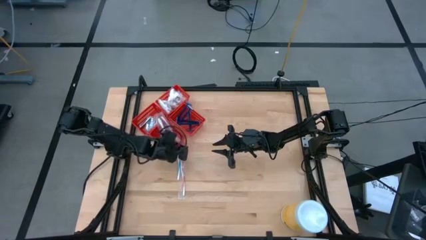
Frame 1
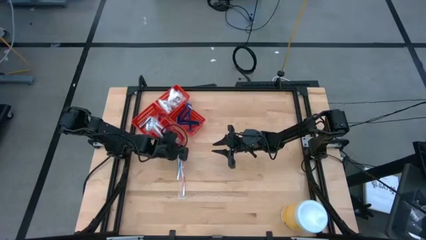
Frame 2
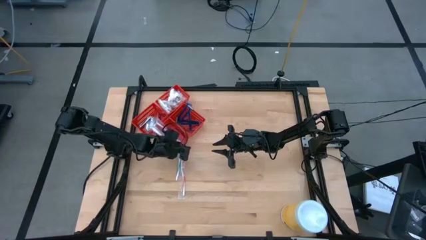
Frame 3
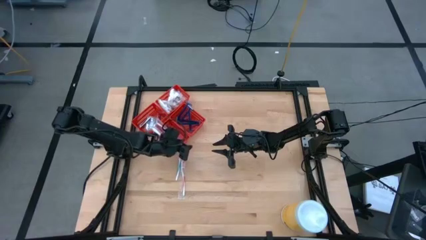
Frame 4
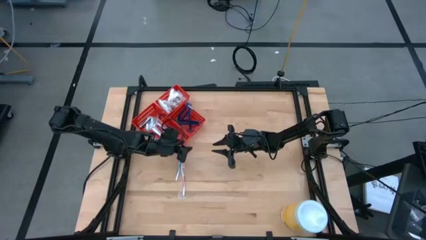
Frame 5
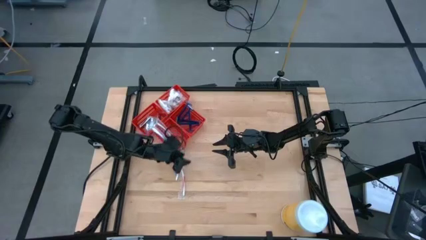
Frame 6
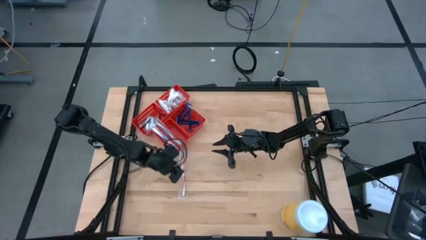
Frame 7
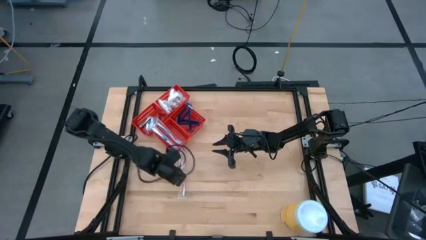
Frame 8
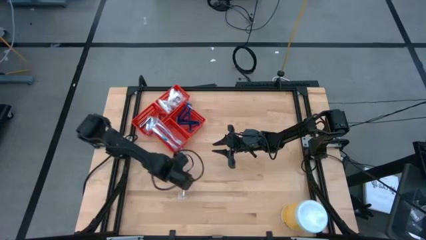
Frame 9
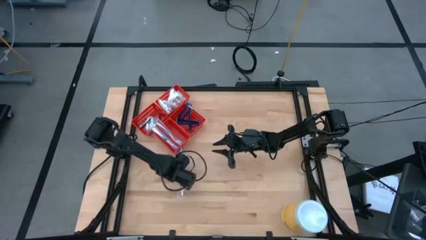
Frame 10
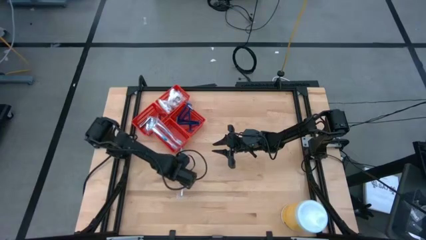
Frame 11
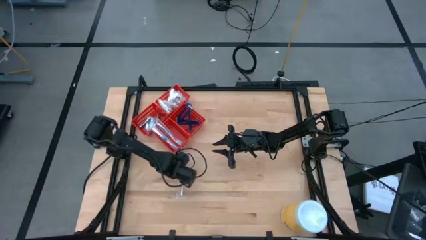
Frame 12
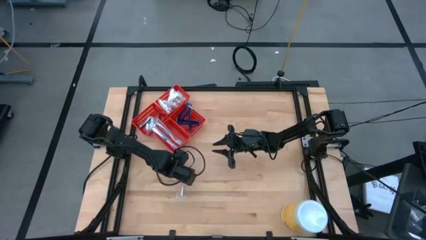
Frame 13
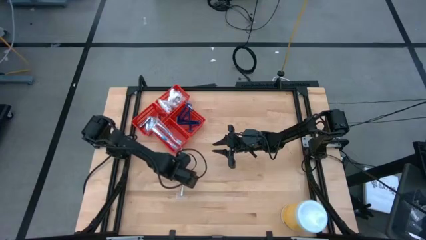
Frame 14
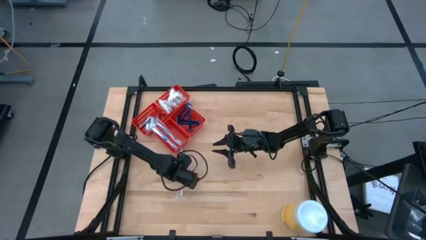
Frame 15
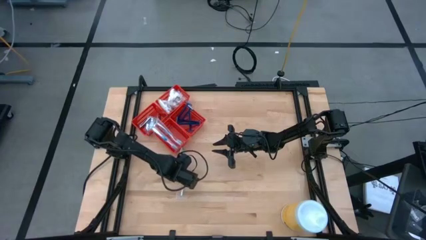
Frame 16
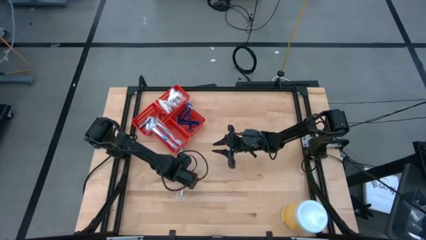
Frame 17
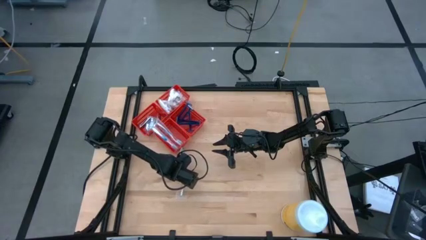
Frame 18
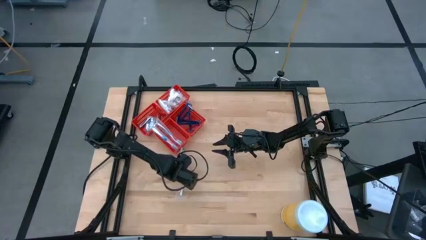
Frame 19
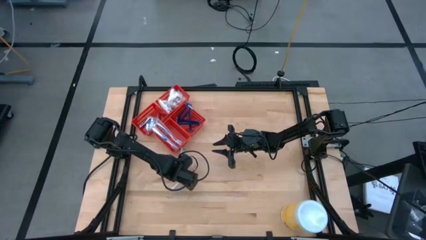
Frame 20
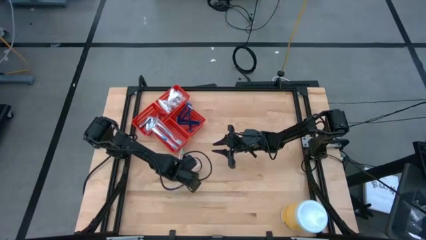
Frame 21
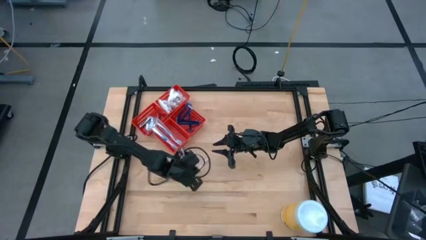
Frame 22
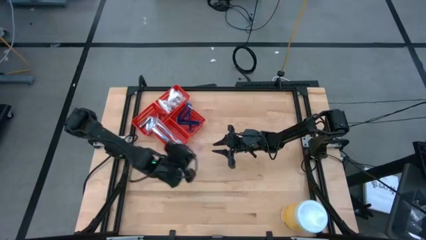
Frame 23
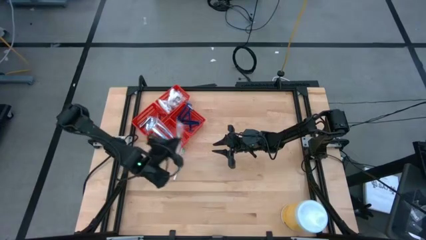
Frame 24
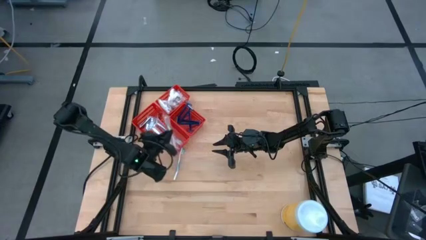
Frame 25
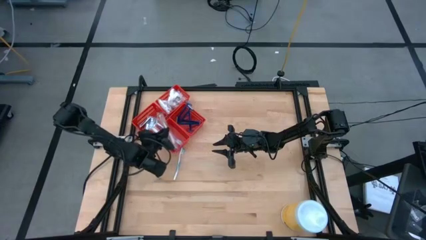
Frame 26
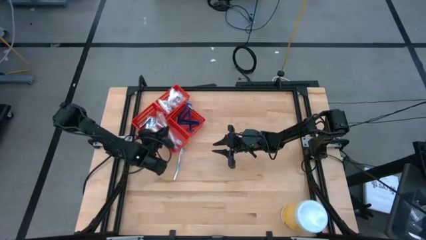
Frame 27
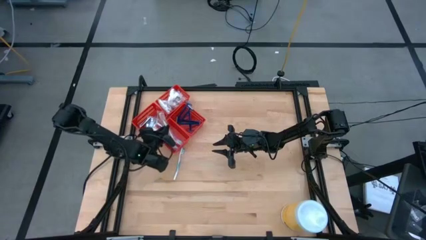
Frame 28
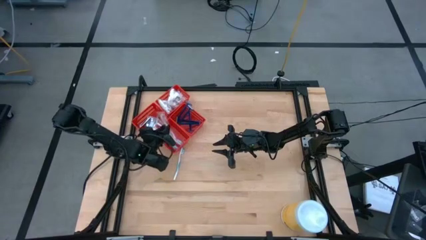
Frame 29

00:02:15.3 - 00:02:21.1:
Task: Pick & Place Travel size toiletries
Put the orange toothbrush into the verical left red bin

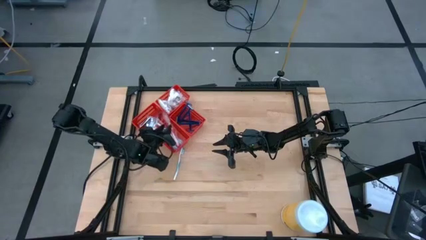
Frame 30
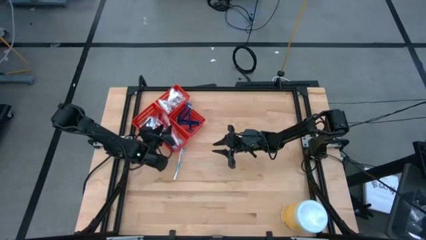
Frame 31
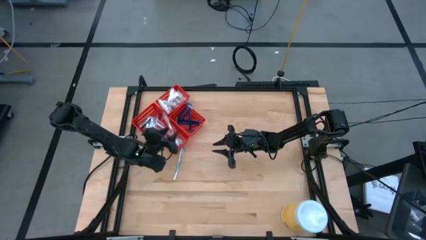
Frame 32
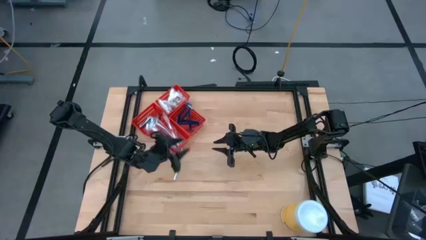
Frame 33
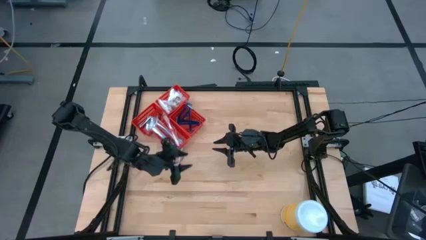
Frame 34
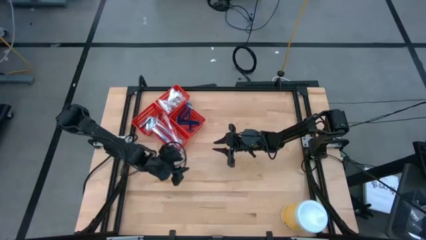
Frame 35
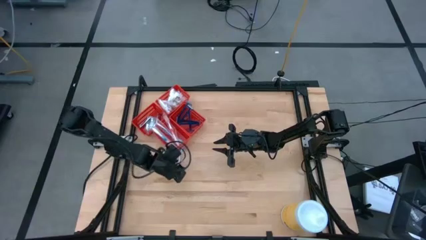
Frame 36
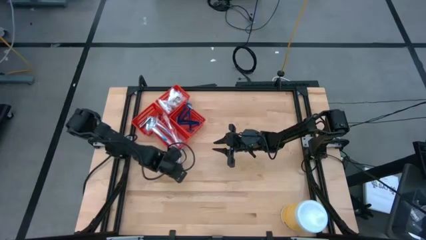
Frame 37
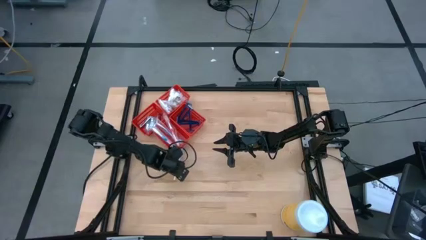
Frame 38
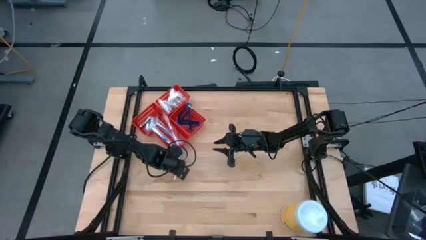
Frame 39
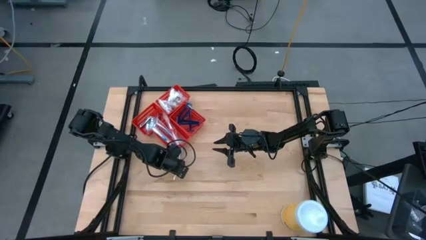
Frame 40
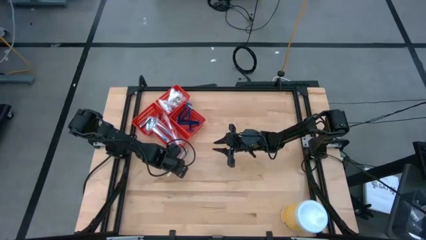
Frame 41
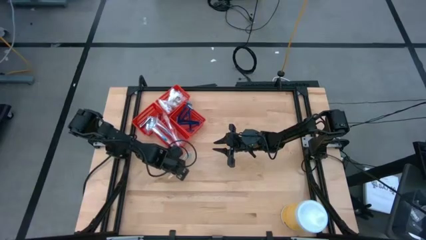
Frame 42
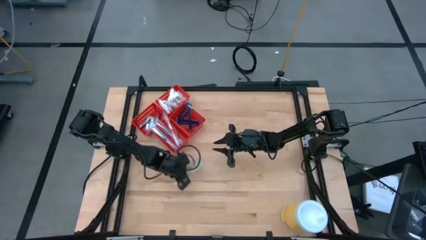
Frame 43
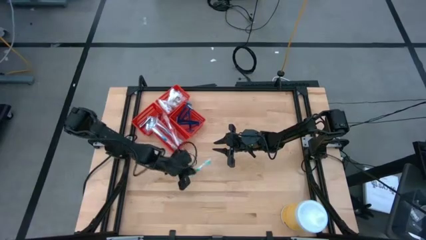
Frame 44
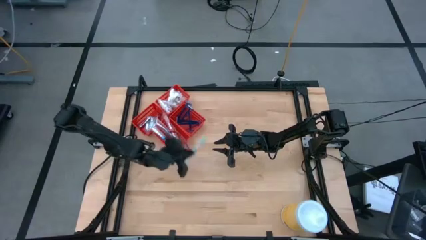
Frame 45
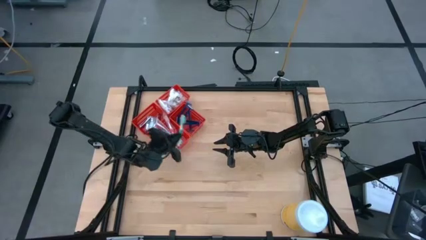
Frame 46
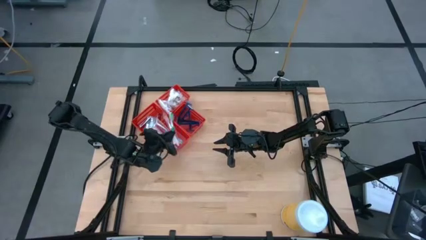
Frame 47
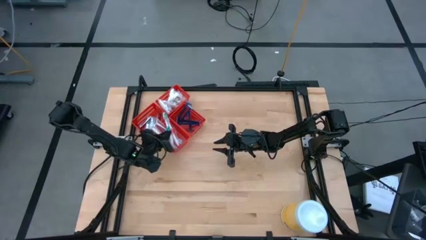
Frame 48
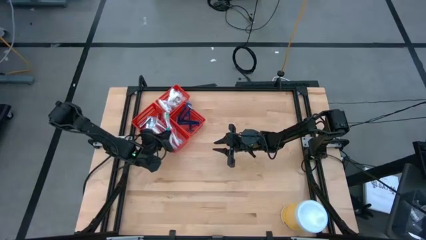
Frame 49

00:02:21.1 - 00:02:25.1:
Put the green toothbrush into the vertical left red bin

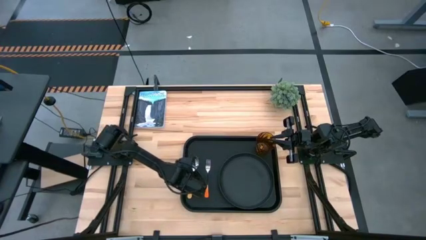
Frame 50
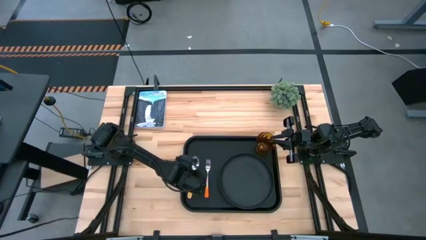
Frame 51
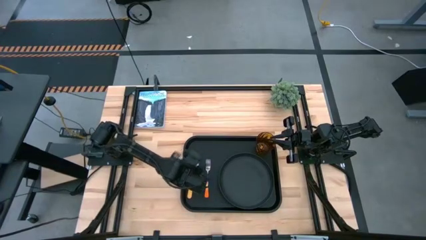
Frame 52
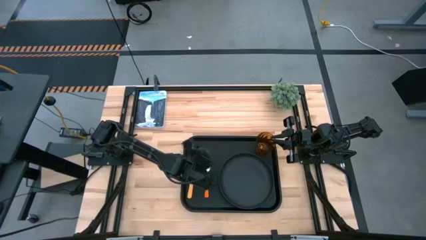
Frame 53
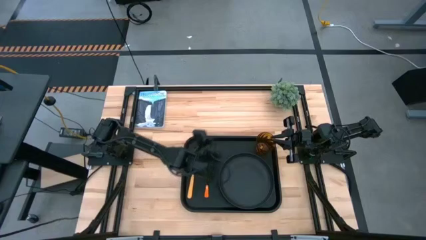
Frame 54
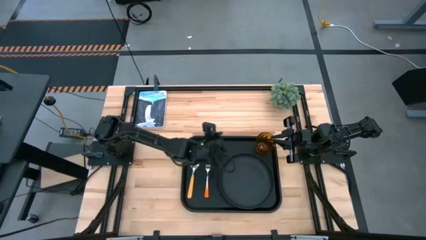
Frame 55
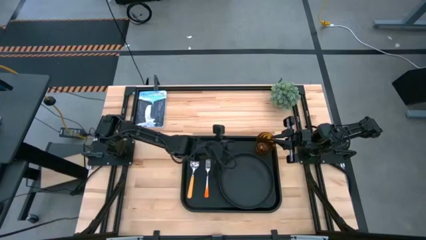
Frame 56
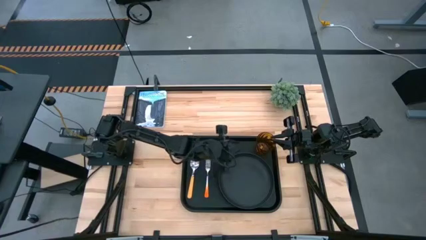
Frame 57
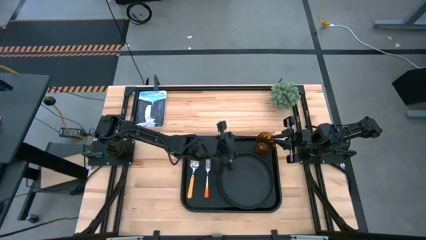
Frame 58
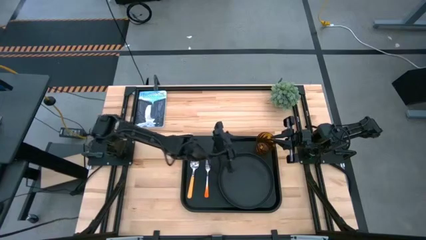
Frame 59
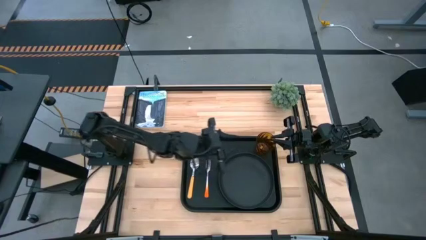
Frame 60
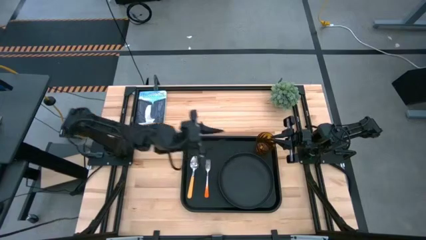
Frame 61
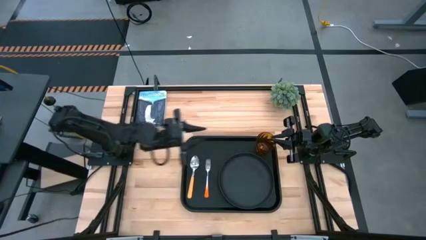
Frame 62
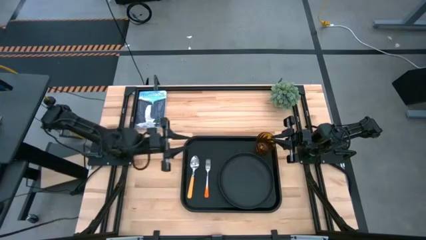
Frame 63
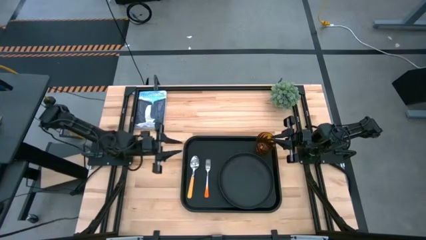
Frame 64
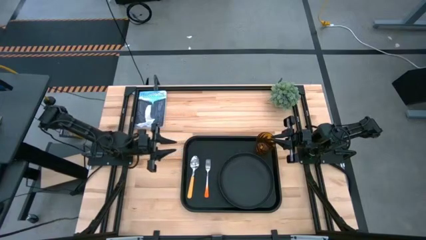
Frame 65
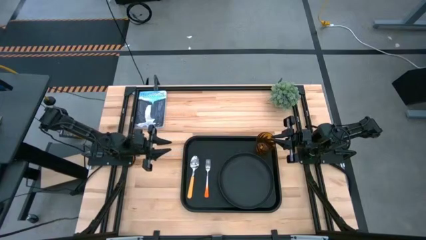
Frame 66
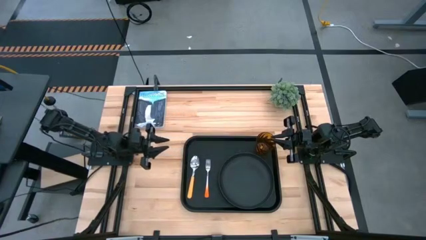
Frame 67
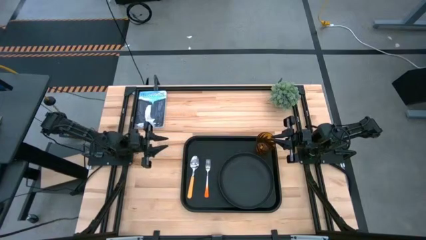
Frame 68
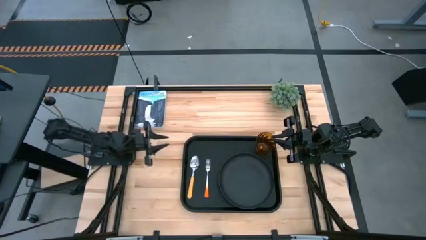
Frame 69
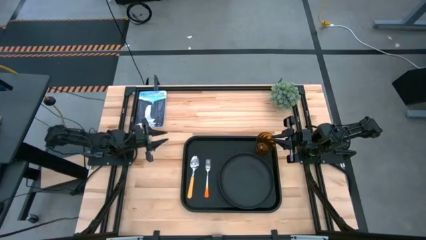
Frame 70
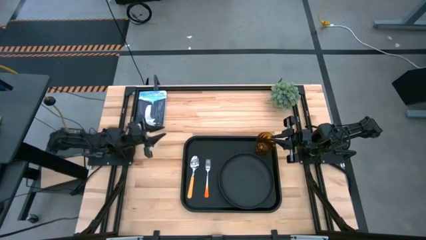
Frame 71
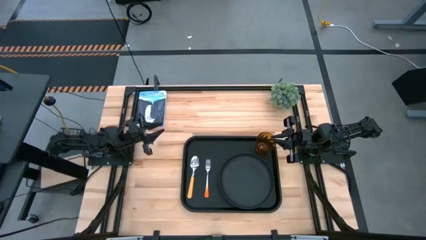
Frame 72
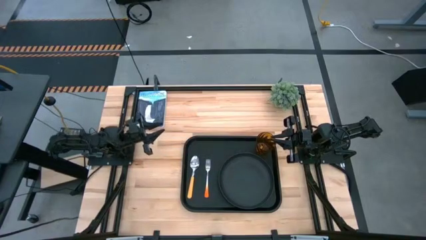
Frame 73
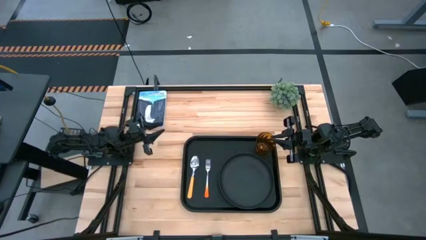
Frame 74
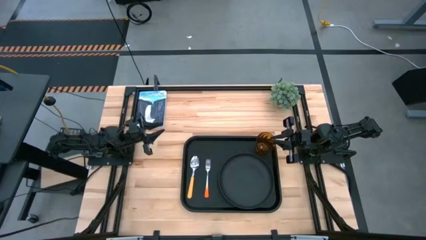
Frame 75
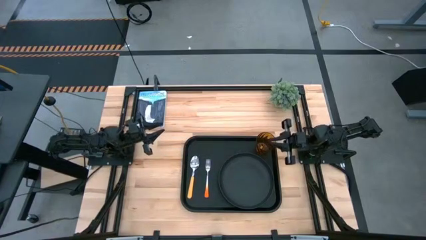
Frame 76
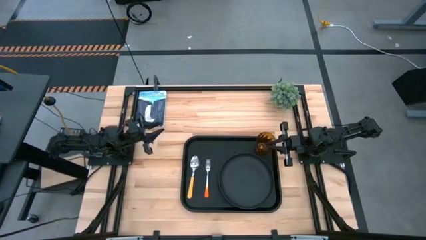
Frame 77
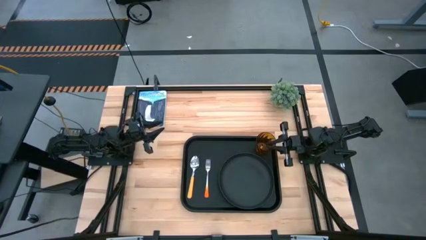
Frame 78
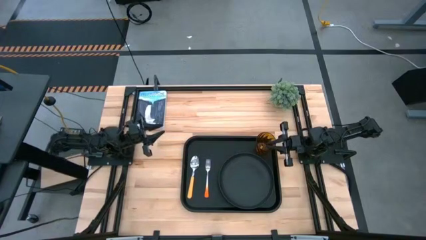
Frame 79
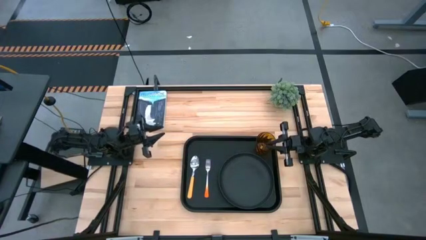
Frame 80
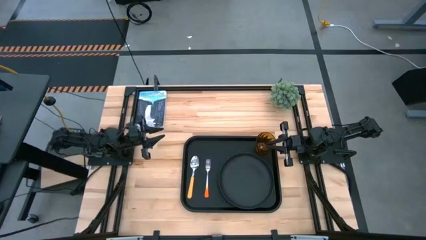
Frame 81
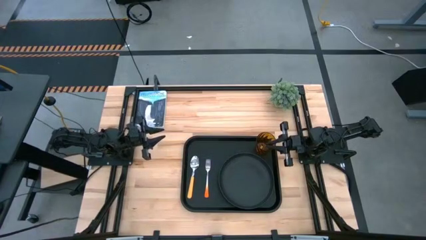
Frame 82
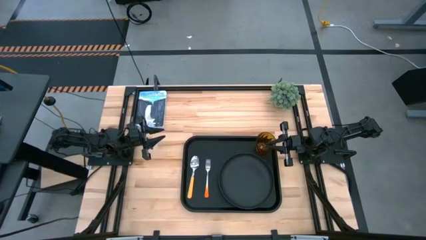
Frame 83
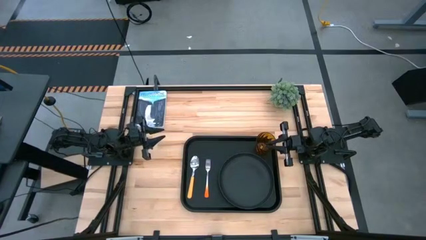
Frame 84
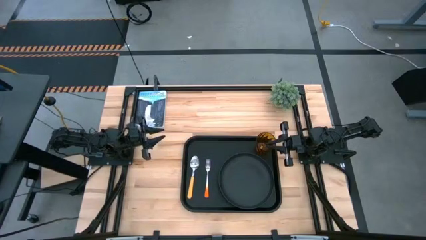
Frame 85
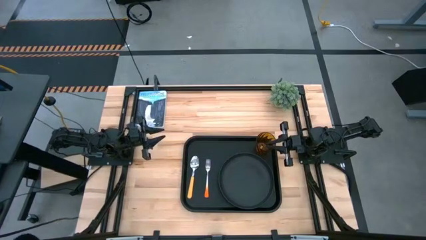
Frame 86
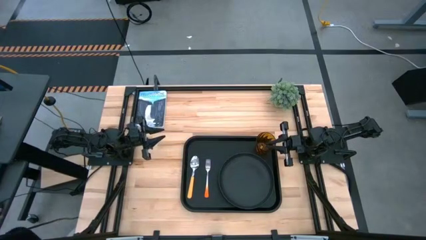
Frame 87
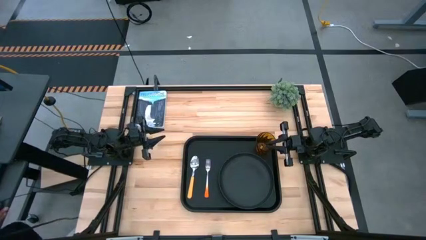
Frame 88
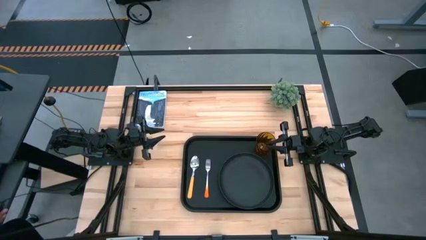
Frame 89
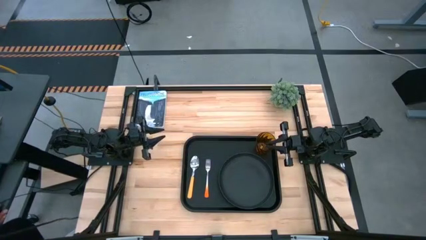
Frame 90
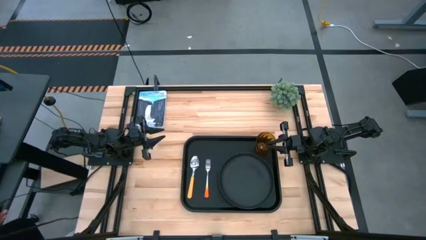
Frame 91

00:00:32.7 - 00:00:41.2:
Task: Pick and place plate/cup/fork/spoon on tray
Return to Home Position
